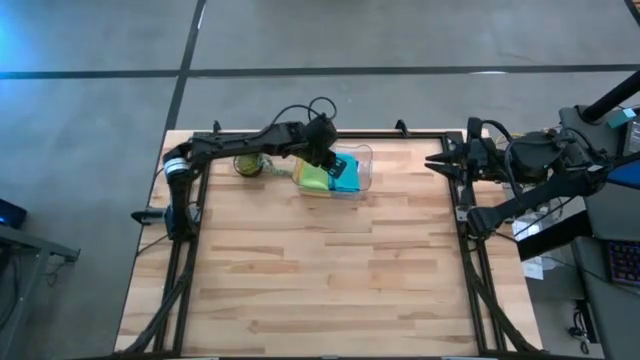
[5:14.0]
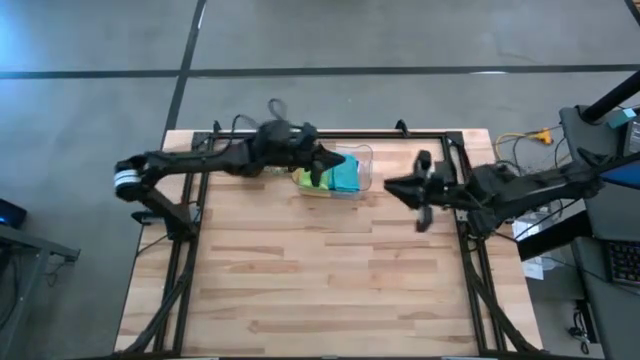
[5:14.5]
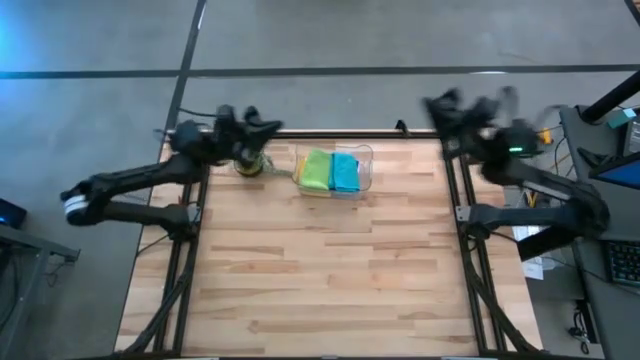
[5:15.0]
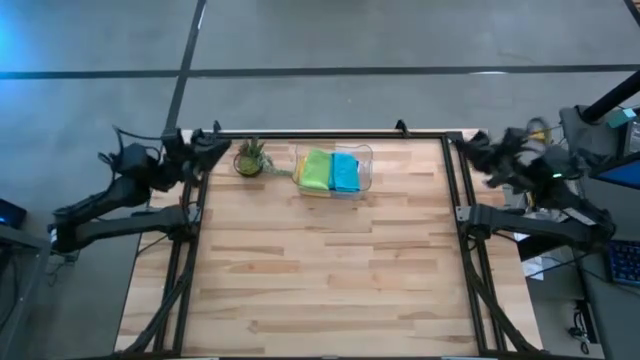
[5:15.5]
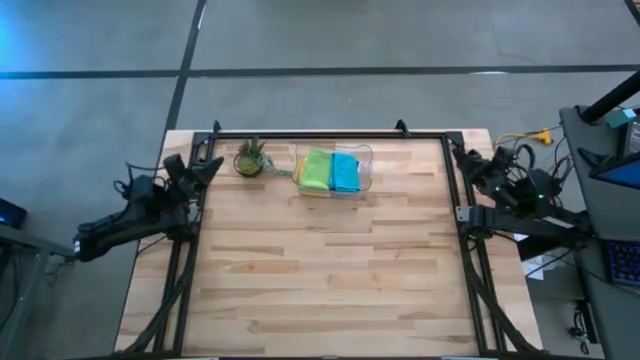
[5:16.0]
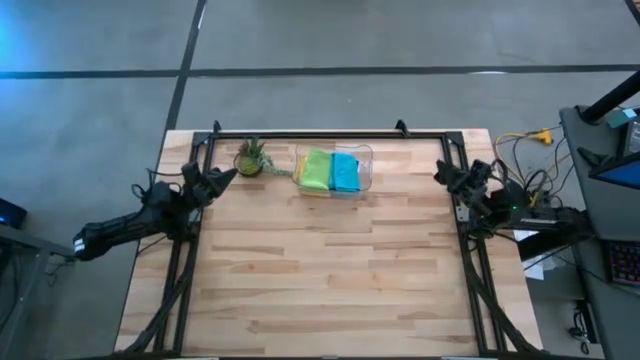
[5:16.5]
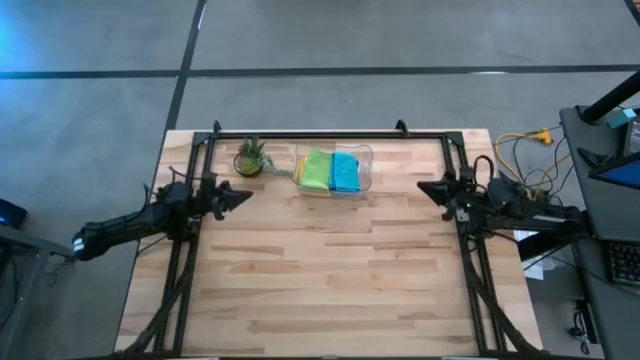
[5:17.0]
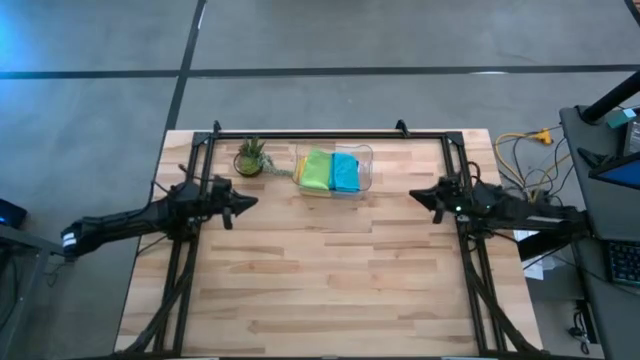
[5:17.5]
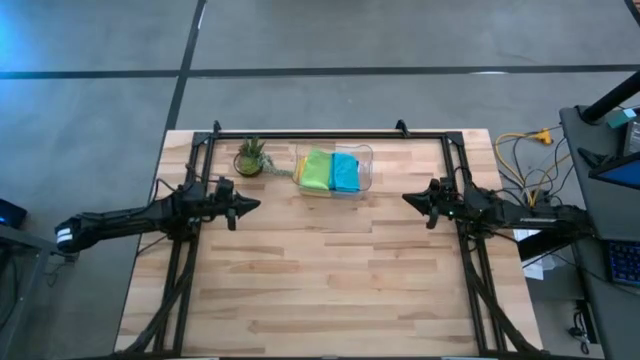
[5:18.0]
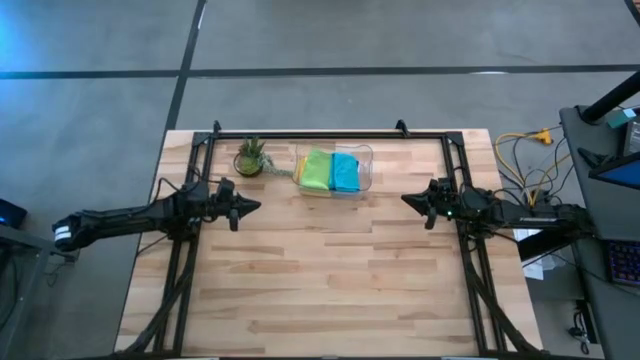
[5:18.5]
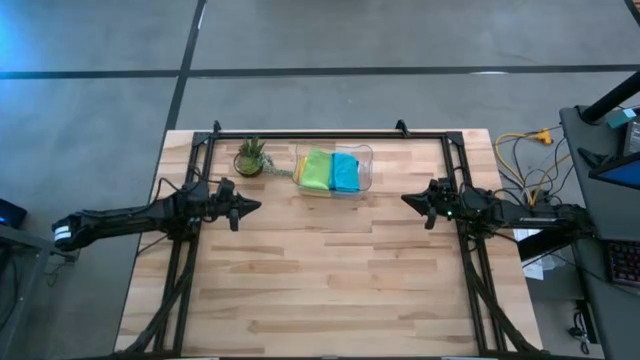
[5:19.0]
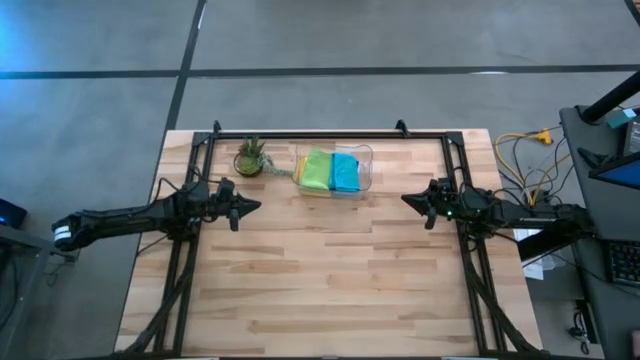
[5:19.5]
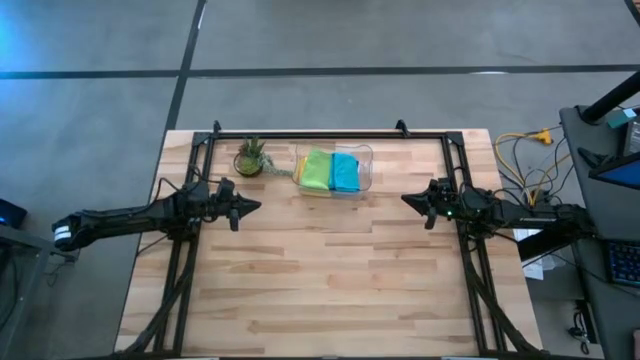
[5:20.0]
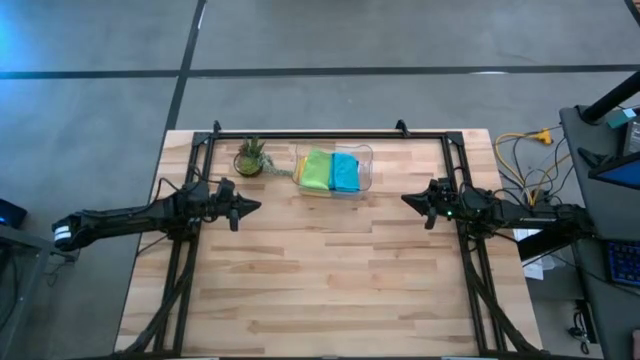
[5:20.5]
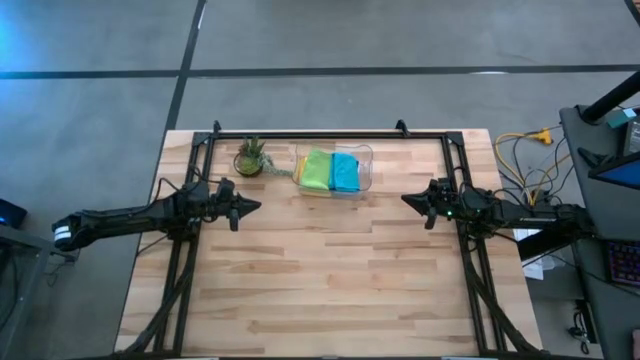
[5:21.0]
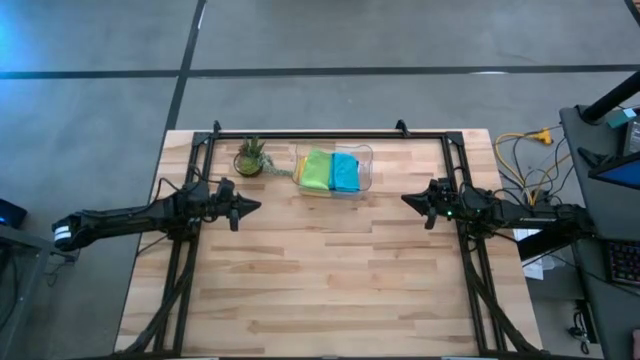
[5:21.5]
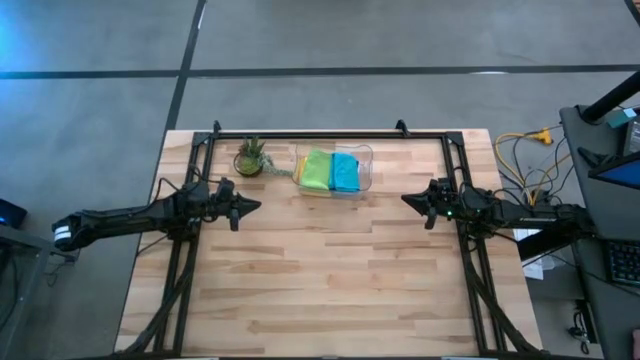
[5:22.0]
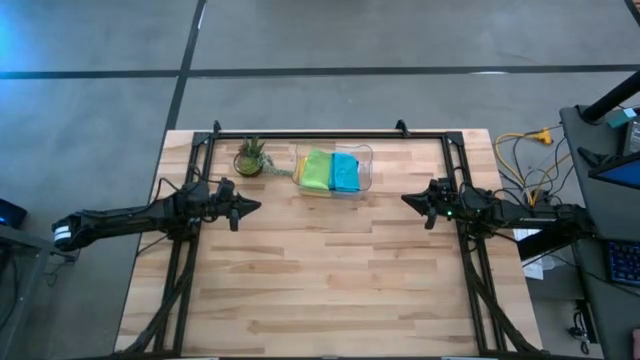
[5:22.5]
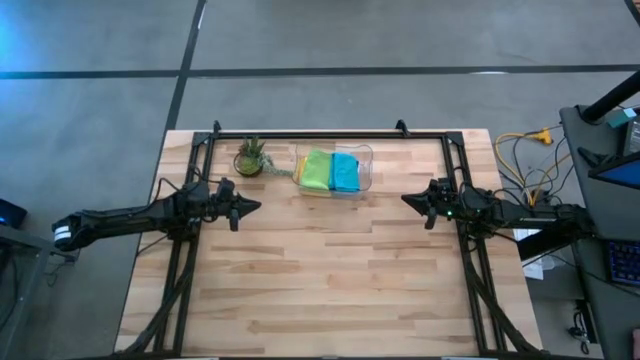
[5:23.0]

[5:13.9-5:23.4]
Task: Fold microfiber towels
Return to Home Position

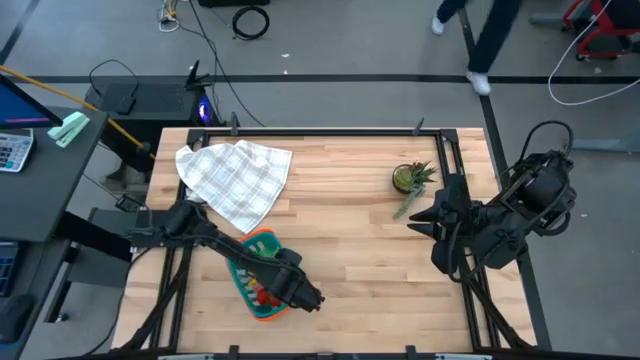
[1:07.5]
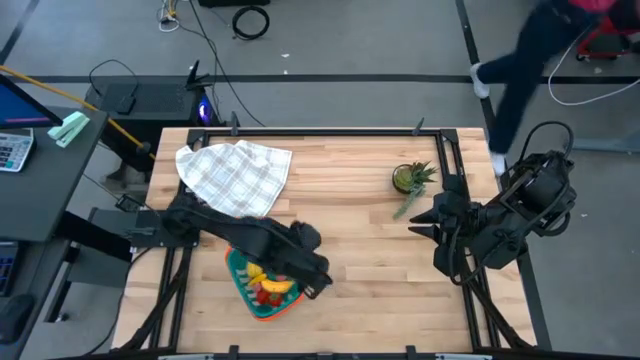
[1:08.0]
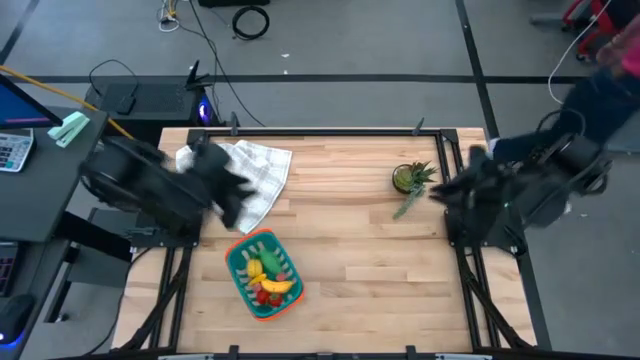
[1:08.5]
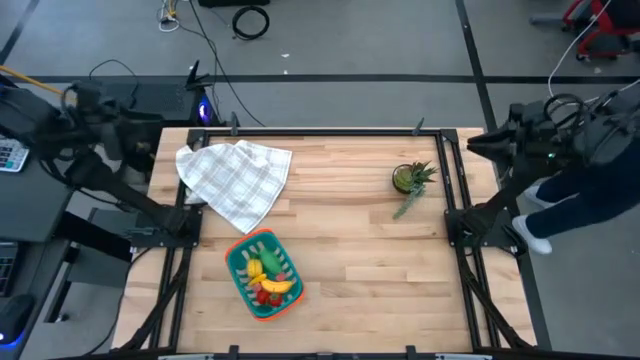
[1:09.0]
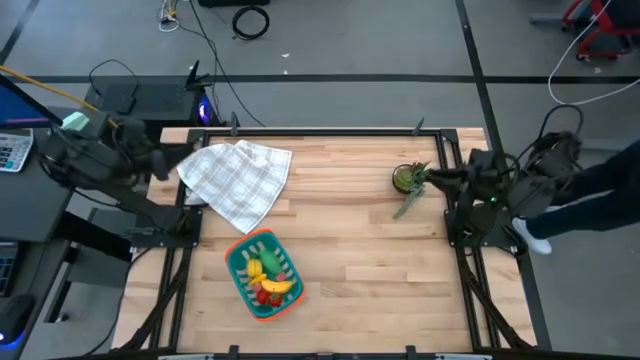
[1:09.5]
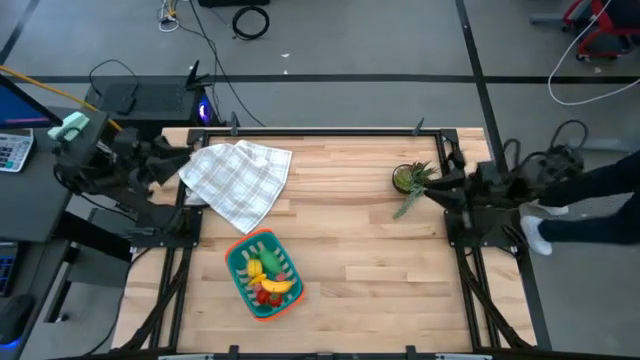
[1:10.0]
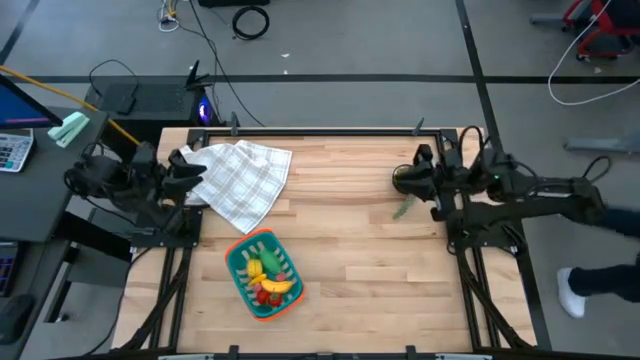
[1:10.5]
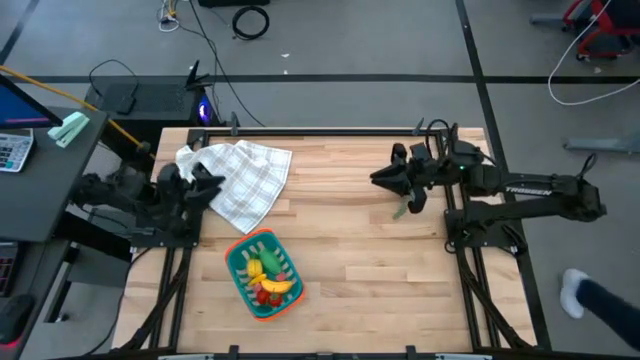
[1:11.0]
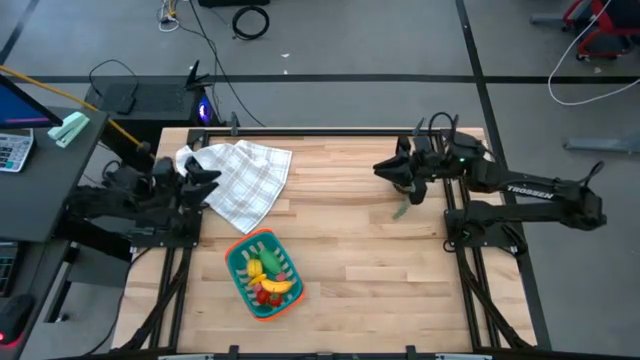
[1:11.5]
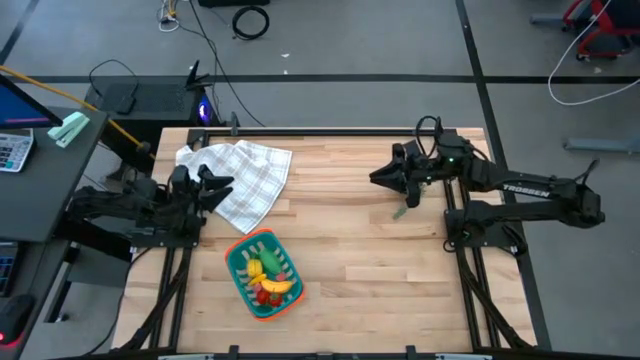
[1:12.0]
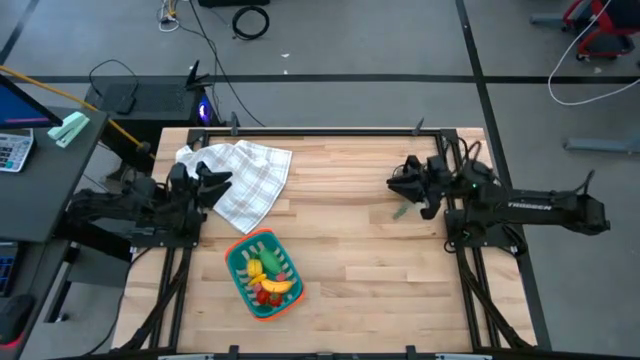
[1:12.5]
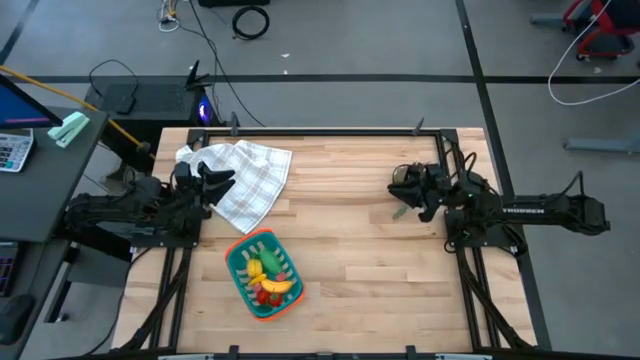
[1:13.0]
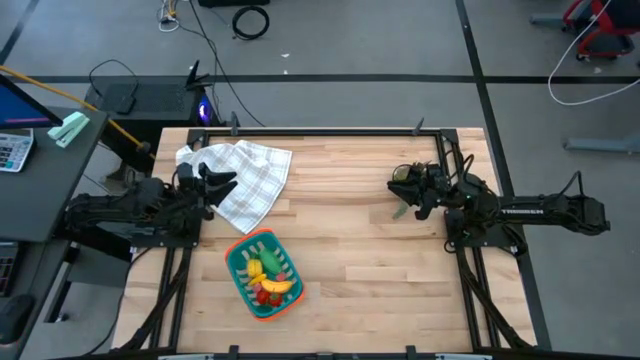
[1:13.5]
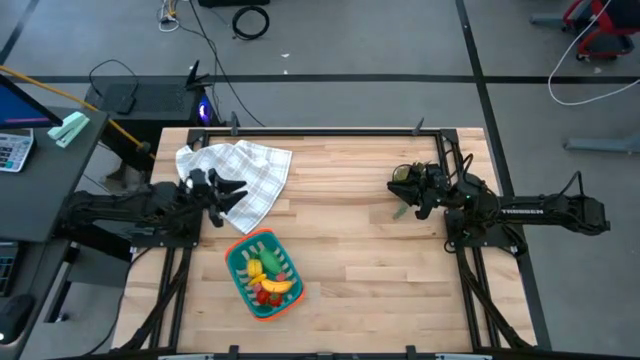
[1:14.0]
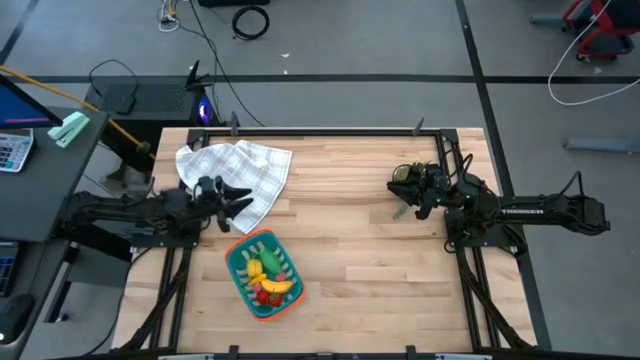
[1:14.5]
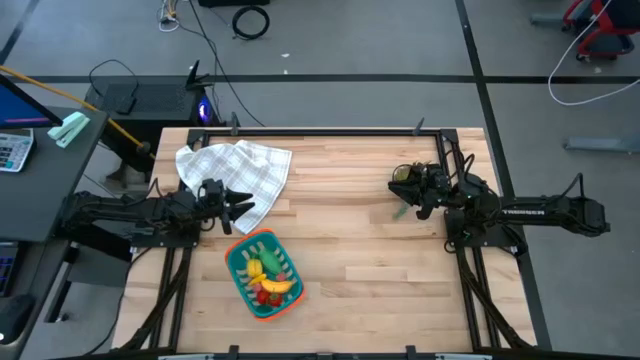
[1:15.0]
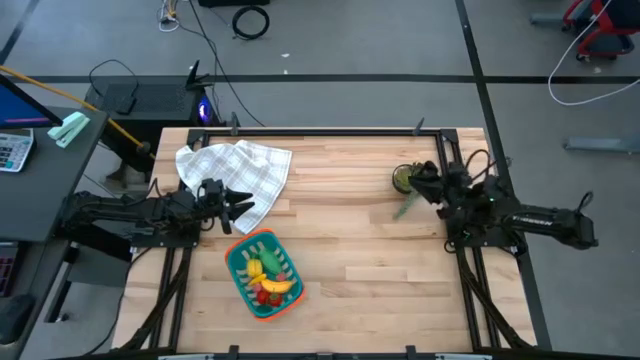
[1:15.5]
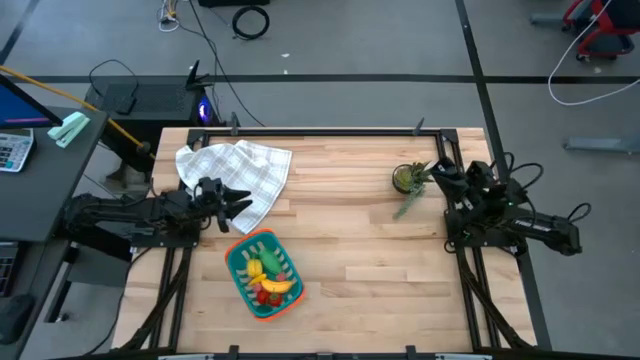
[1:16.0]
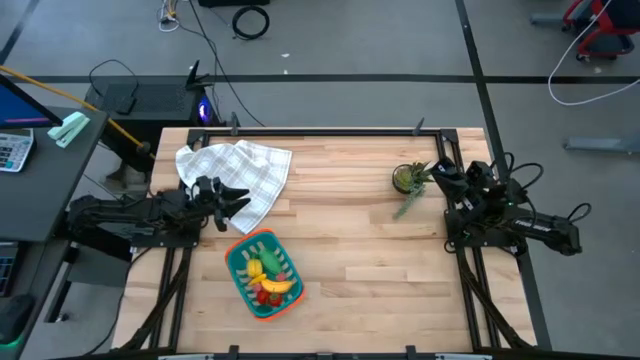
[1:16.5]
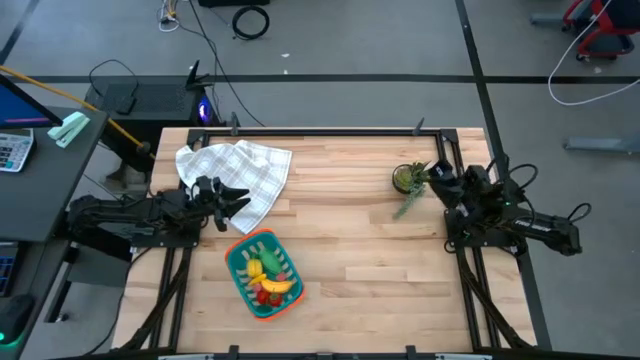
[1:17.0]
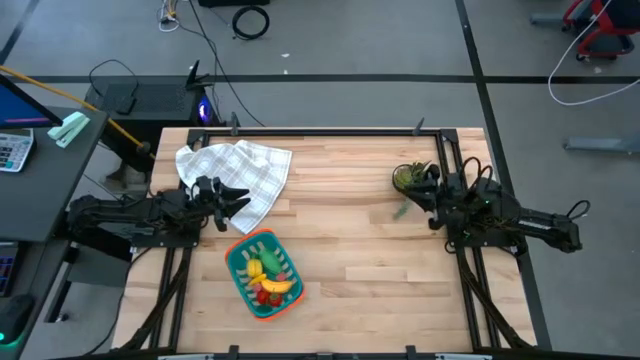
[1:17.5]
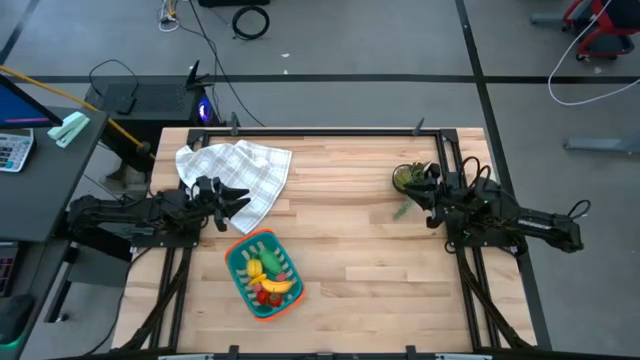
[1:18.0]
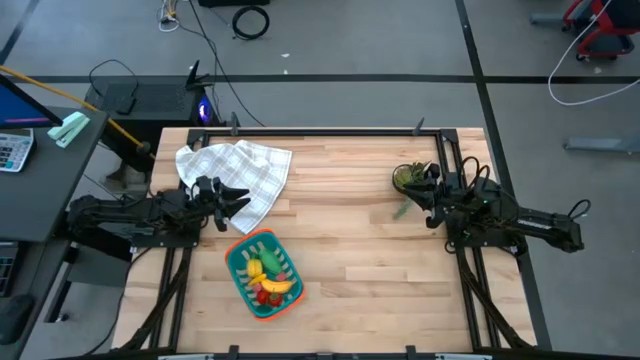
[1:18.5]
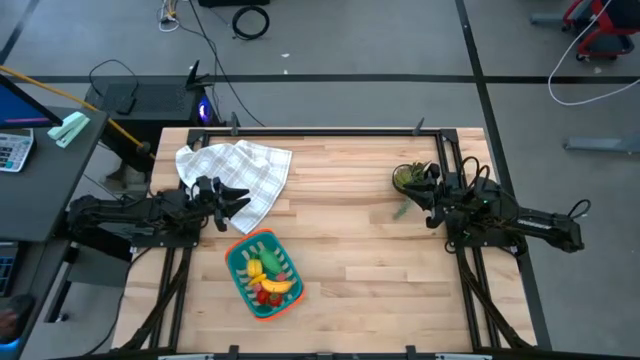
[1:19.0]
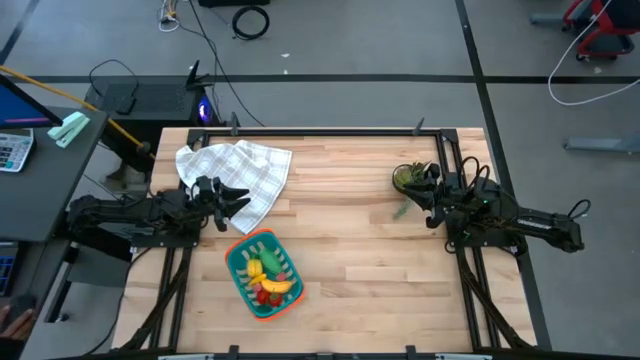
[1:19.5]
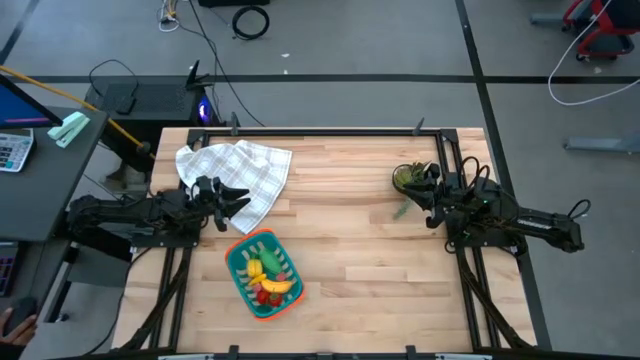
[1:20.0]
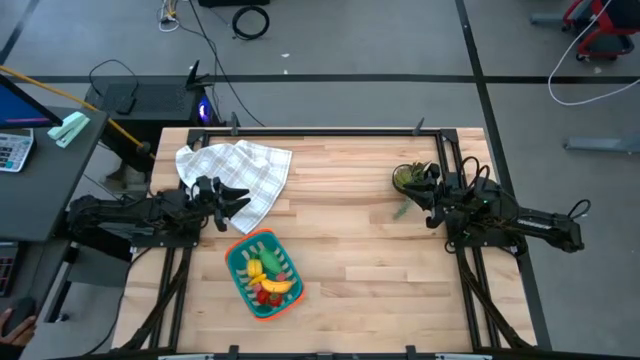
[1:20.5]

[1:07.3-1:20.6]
Task: Pick and placing Produce into tupperware
Return to Home Position
